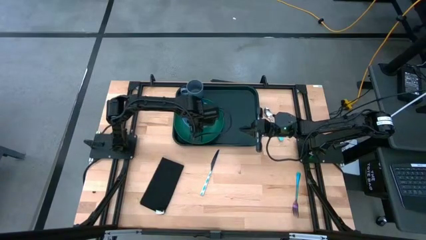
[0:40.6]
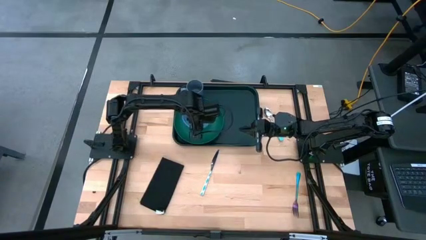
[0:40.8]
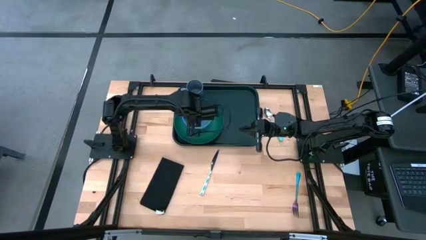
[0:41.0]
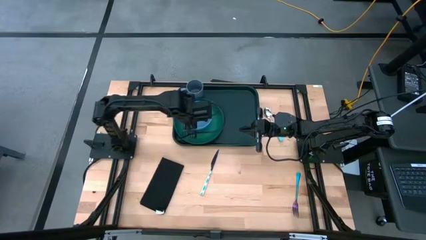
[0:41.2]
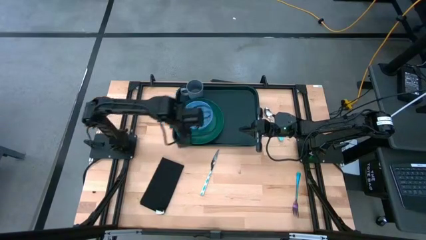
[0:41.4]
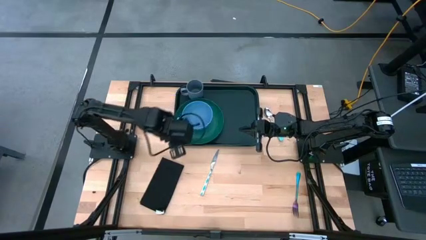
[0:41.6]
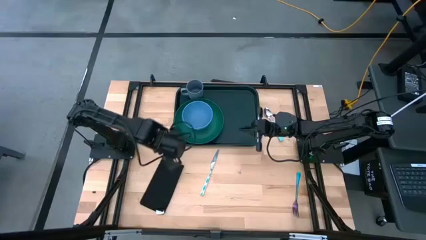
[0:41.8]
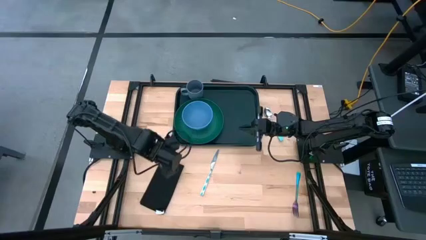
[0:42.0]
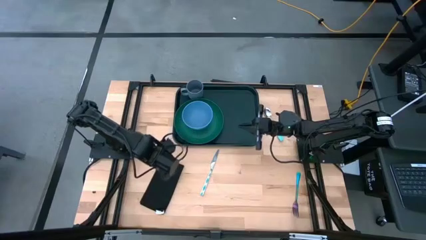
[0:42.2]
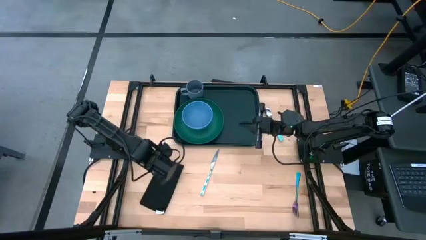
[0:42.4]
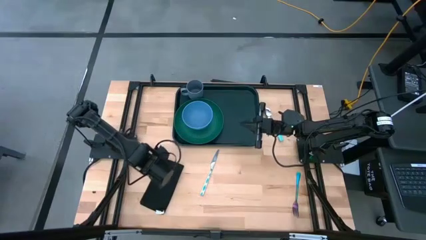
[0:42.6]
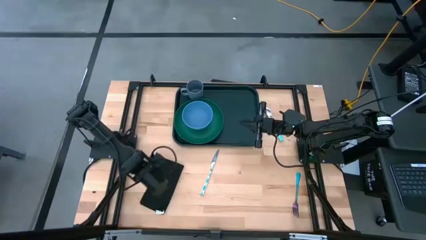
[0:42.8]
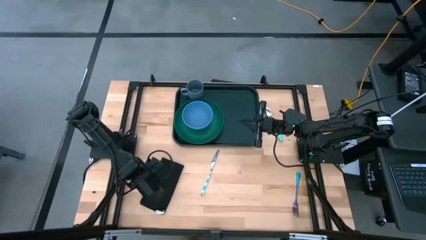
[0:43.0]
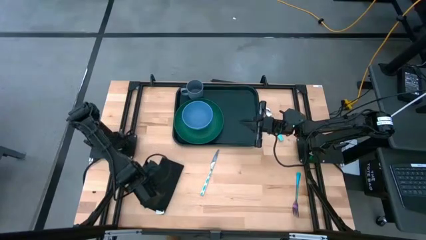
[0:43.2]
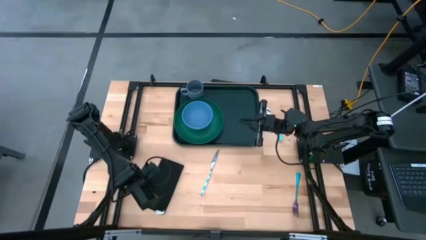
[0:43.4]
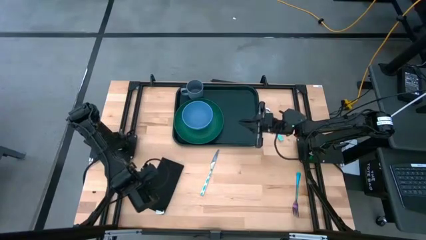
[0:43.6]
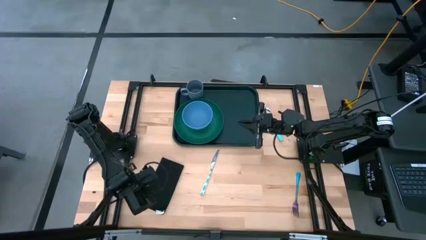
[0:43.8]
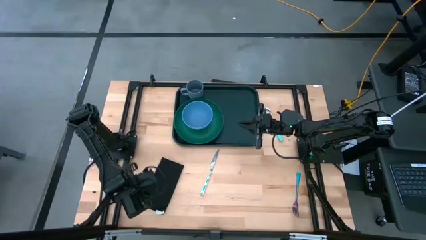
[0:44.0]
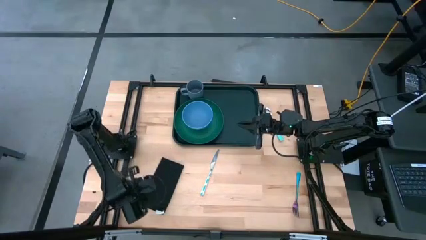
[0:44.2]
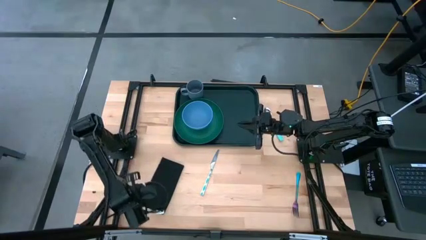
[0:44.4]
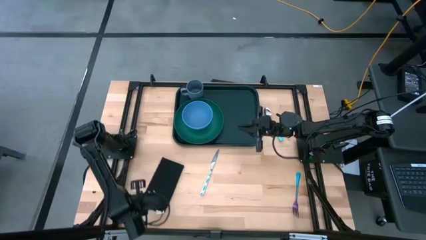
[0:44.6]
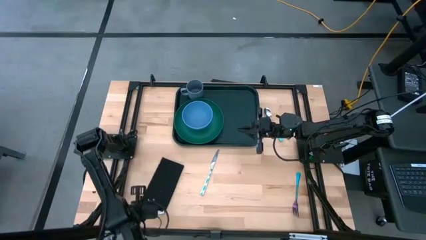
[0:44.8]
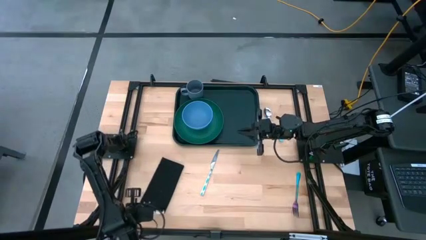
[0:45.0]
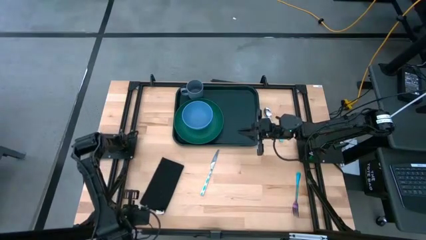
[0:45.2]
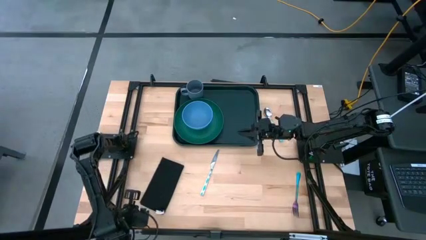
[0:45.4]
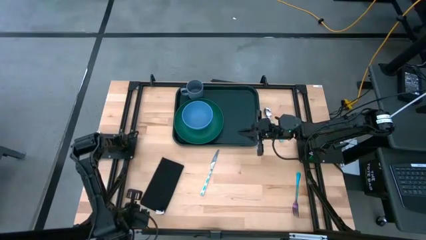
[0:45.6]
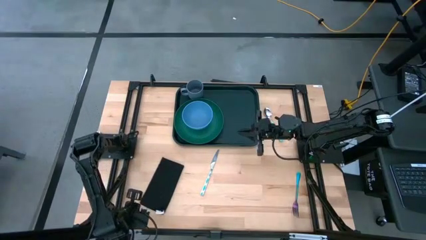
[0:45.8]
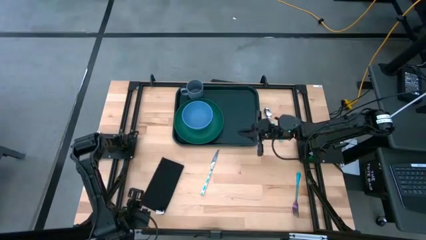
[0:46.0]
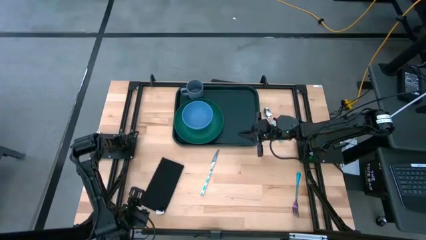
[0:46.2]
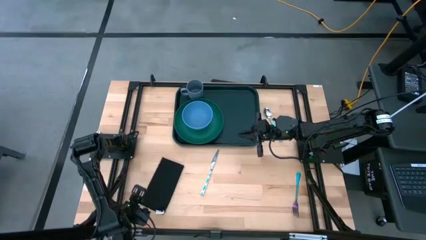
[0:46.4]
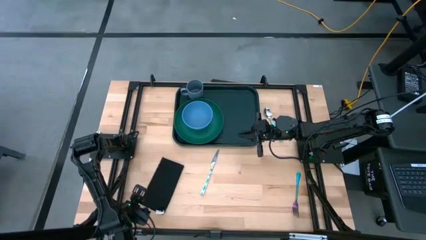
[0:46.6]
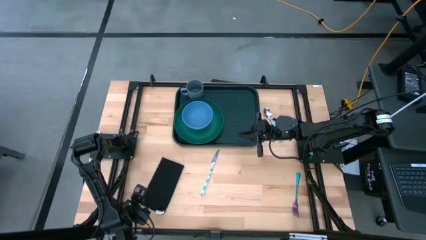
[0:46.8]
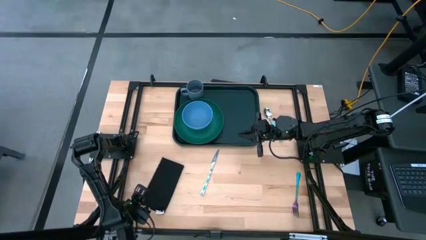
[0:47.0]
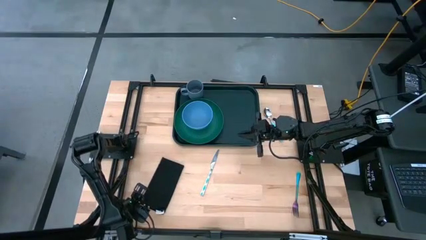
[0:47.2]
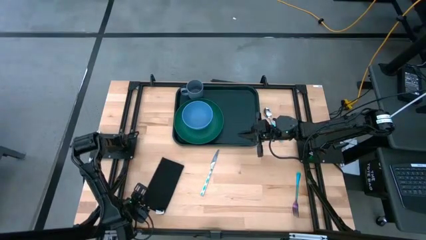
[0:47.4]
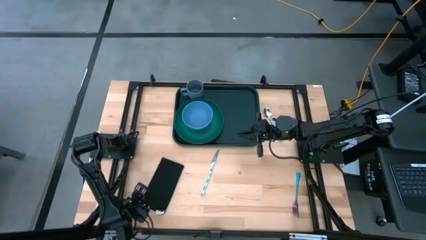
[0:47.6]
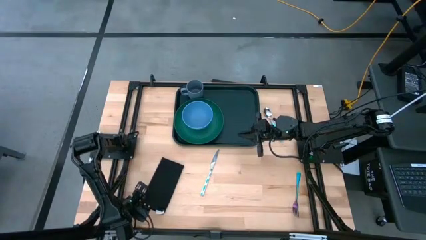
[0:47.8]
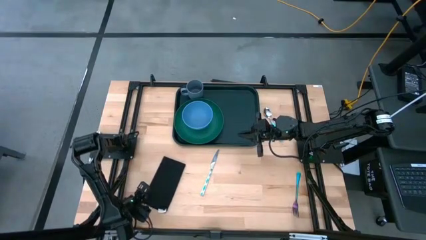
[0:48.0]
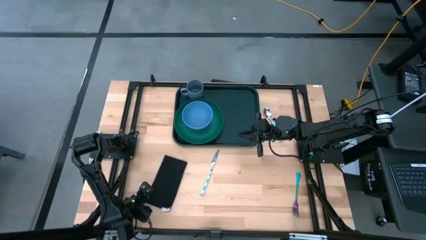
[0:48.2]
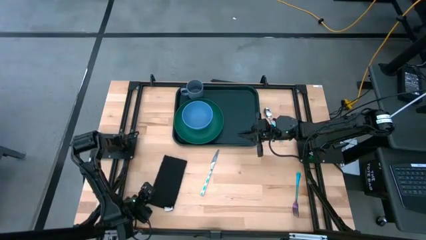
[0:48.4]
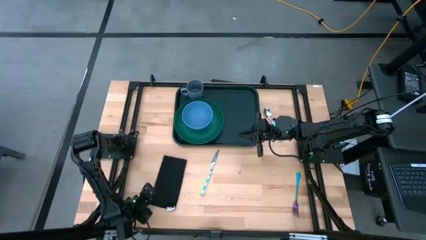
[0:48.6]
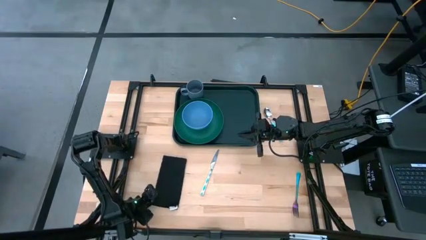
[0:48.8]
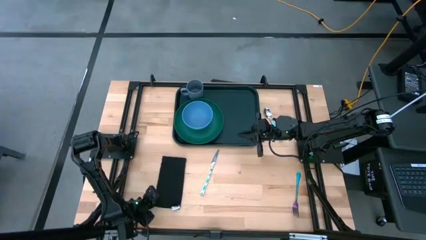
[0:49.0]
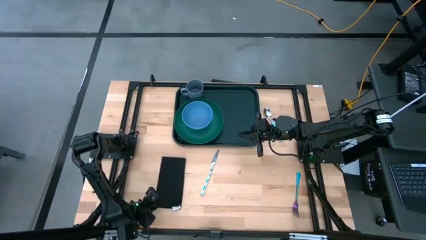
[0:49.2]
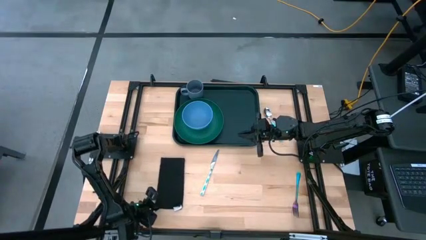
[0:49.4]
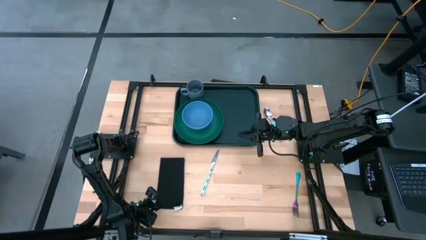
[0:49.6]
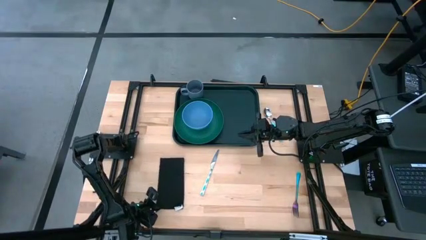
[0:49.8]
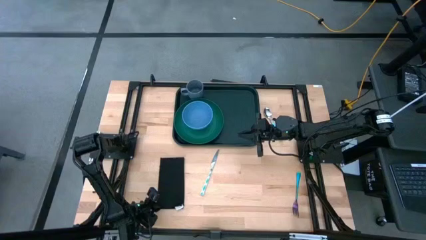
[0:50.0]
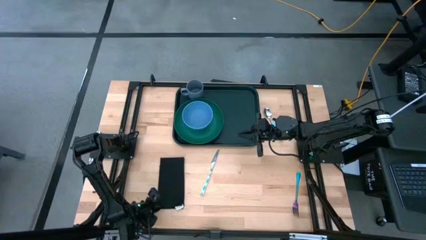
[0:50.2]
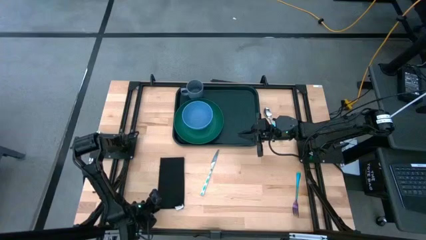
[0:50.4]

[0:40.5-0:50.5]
Task: Set up tray
Put the black napkin on the green tray
